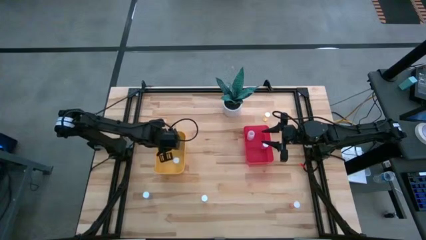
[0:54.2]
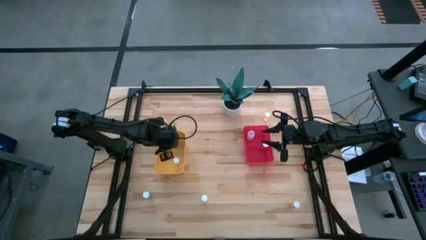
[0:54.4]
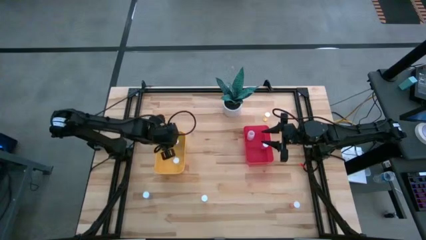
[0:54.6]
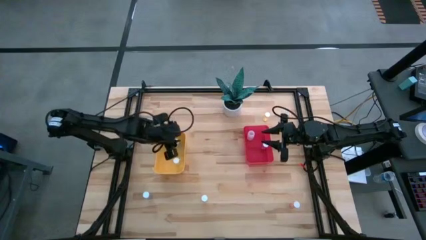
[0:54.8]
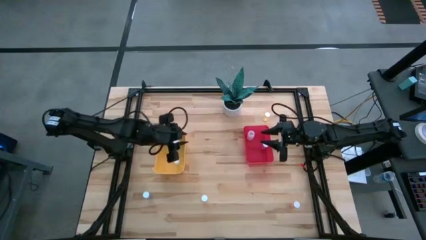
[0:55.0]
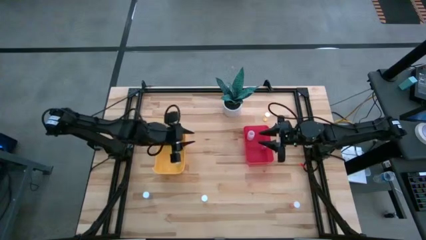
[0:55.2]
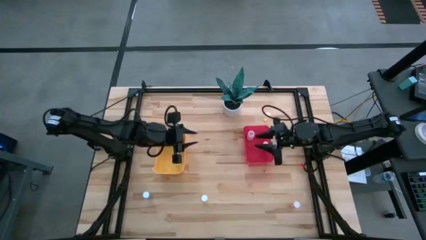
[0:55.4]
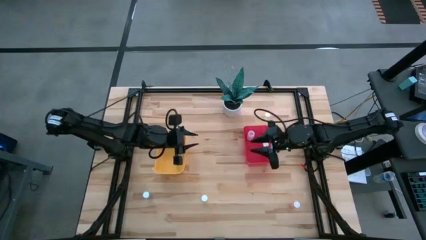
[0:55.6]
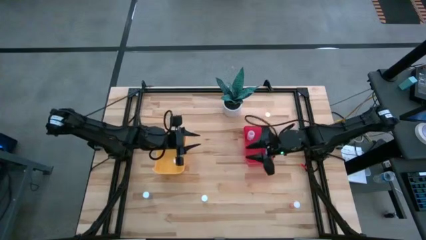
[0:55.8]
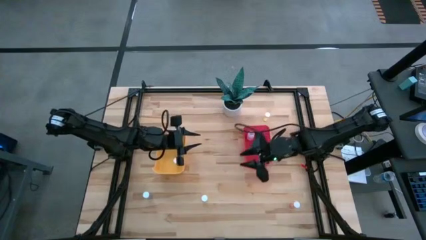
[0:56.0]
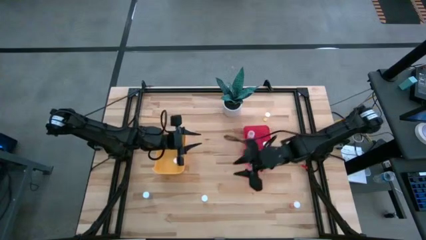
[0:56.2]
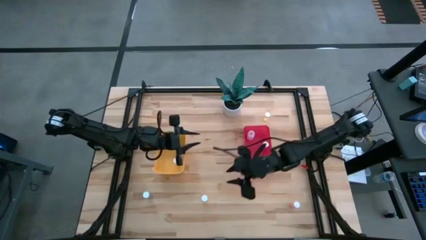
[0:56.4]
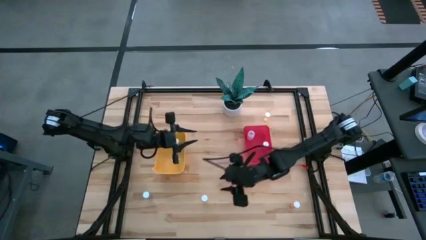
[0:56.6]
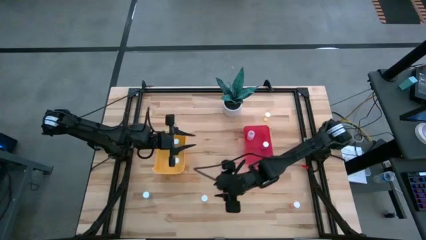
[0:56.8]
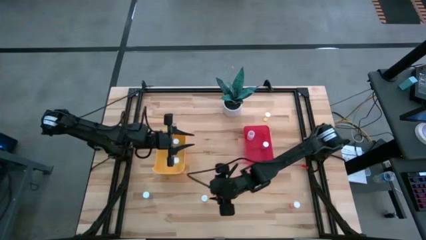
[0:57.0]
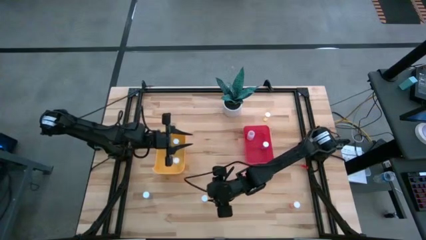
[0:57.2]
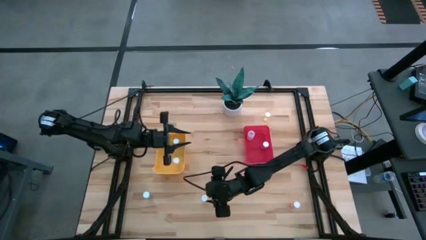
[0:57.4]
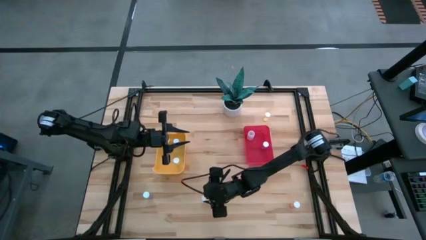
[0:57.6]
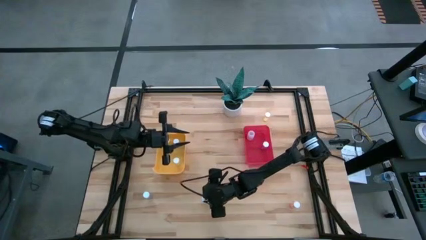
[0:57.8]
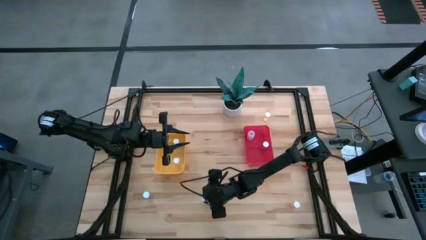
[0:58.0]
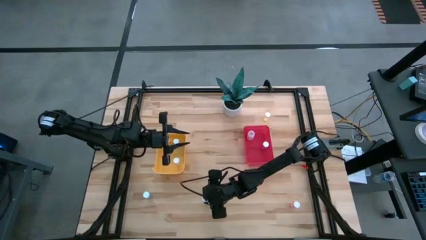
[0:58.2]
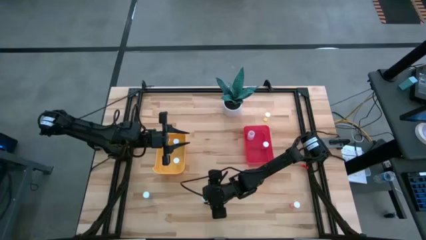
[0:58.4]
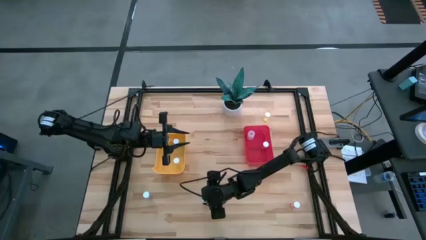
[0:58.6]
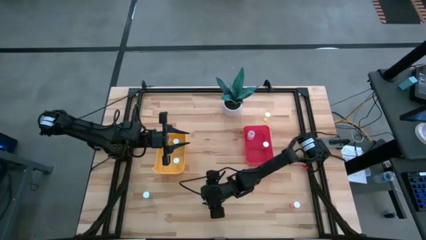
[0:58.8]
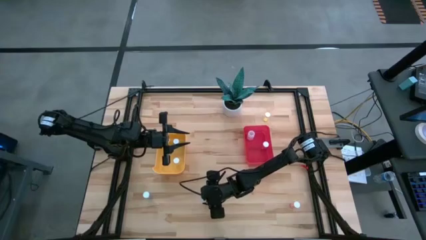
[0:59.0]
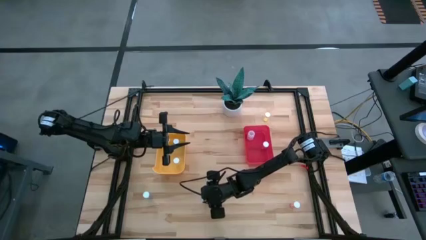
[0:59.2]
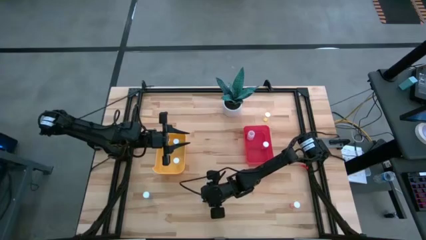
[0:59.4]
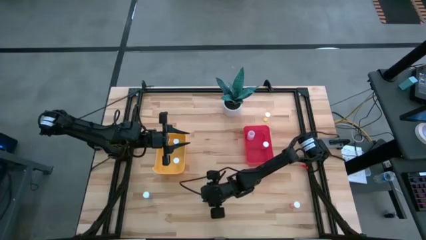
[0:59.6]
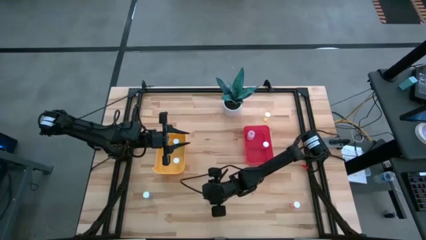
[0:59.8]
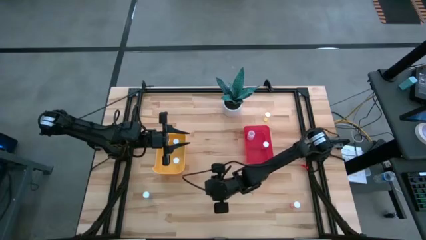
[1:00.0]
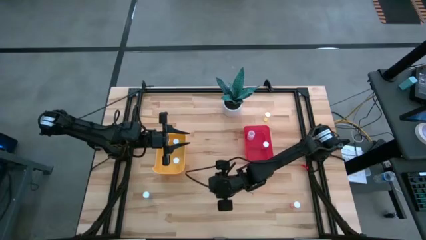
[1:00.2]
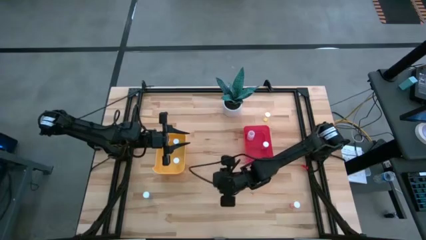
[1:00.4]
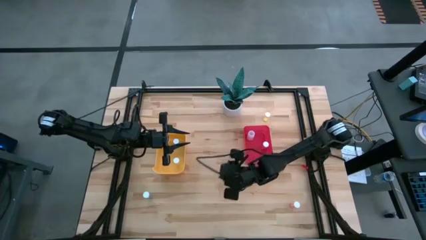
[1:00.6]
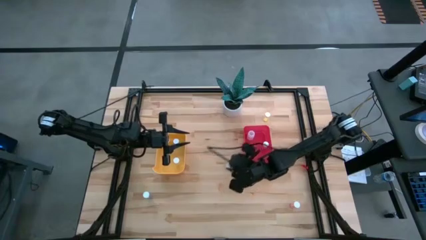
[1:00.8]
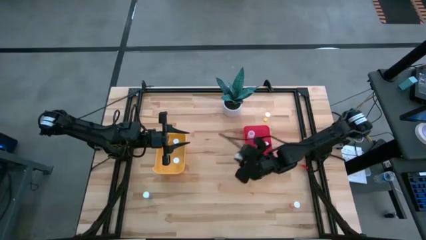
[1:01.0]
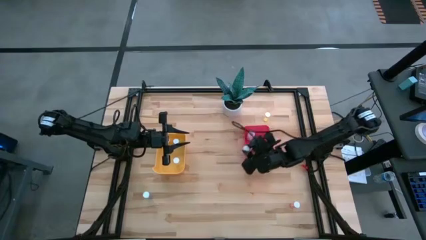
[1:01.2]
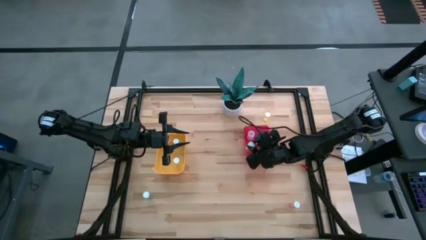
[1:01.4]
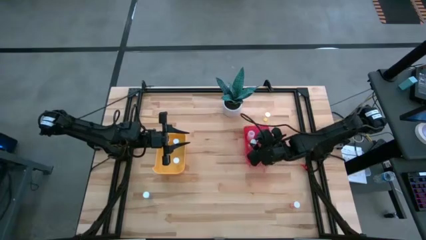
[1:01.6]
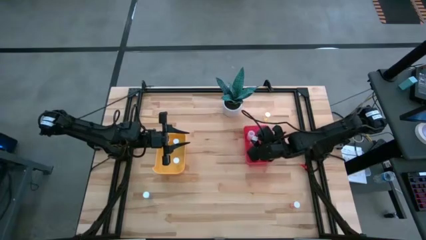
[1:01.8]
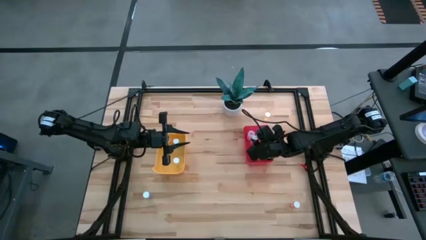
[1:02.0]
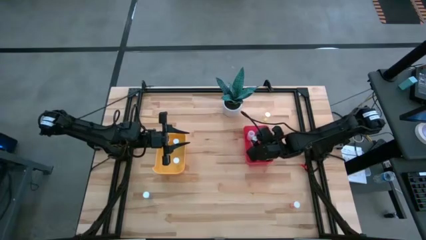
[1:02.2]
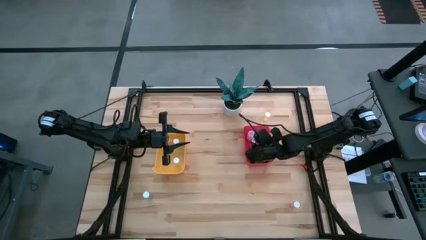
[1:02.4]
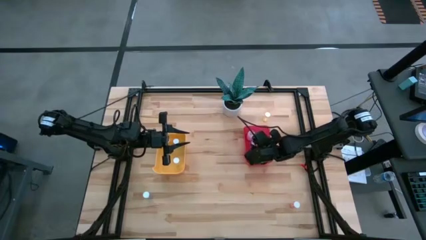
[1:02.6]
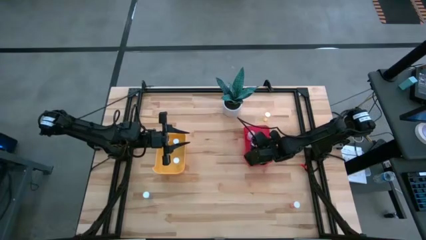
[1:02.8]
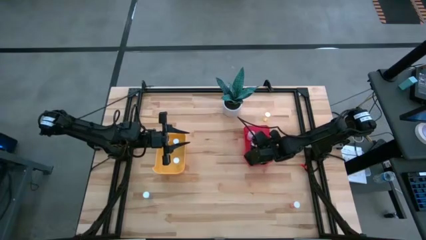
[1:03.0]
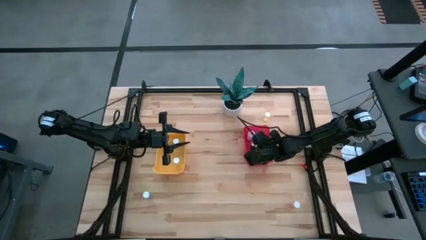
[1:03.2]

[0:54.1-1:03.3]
Task: Pick and place medicine bottles into bin by pill shape (circle, oval)
Put the bottom yellow capsule bottle into the red bin

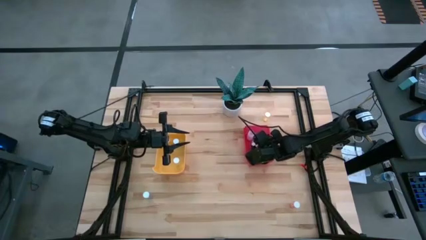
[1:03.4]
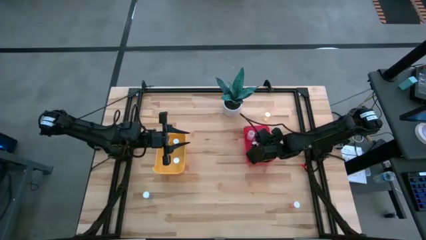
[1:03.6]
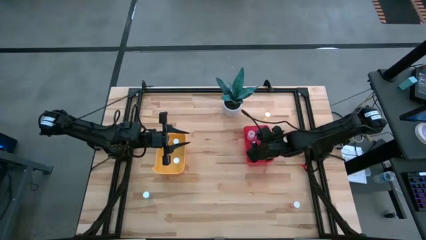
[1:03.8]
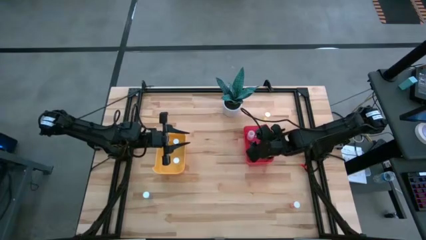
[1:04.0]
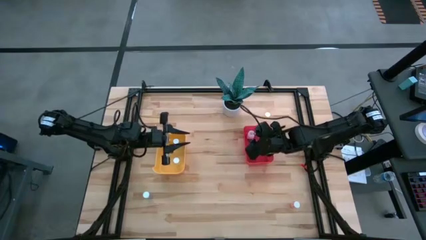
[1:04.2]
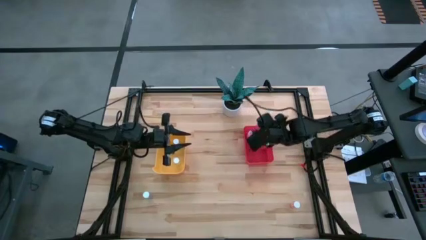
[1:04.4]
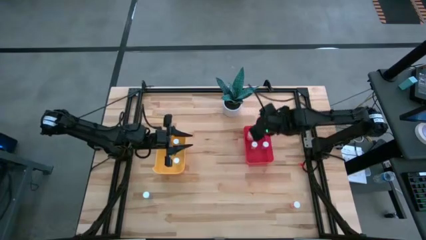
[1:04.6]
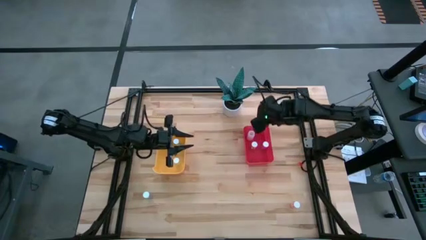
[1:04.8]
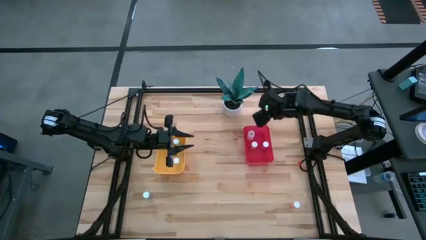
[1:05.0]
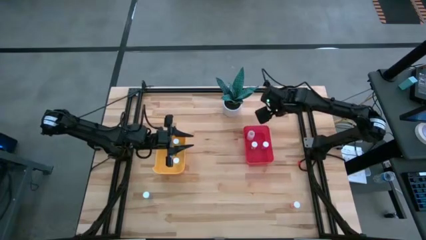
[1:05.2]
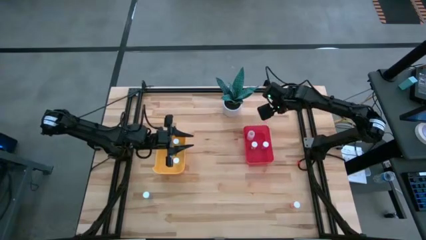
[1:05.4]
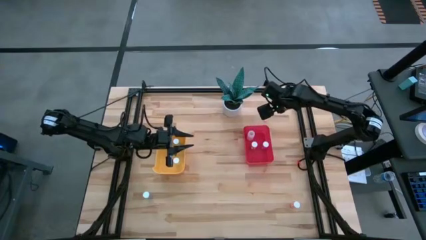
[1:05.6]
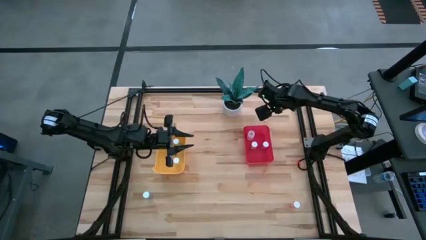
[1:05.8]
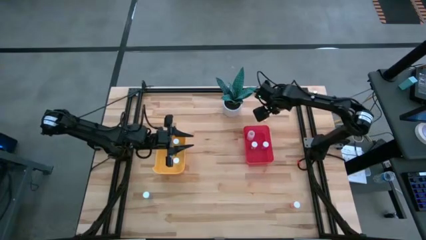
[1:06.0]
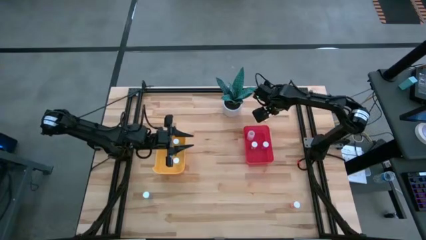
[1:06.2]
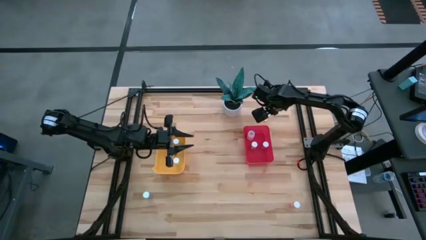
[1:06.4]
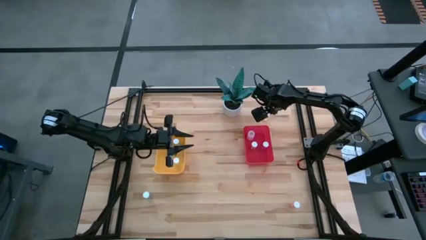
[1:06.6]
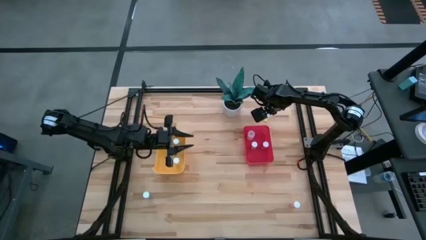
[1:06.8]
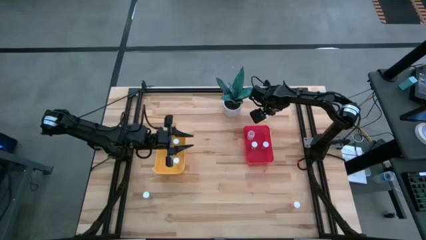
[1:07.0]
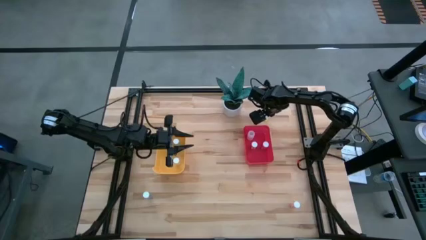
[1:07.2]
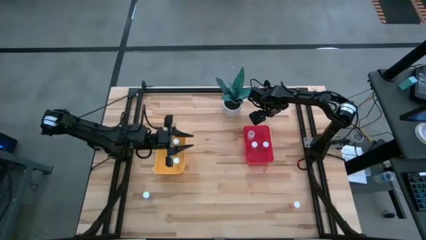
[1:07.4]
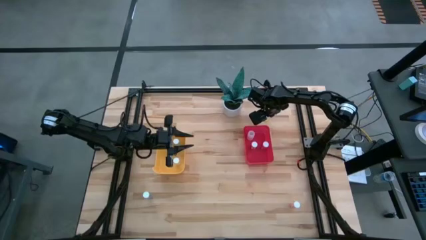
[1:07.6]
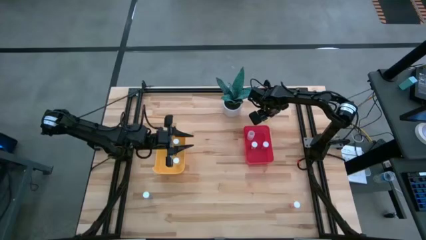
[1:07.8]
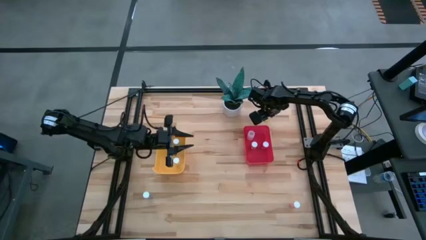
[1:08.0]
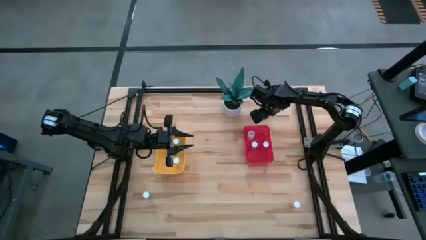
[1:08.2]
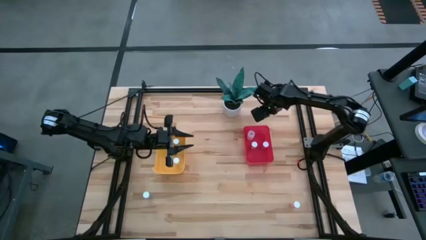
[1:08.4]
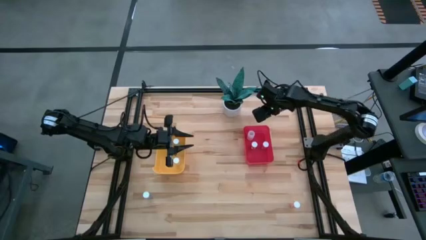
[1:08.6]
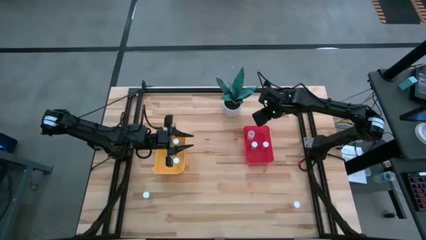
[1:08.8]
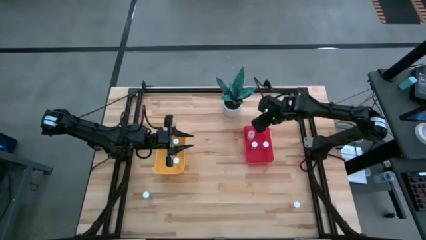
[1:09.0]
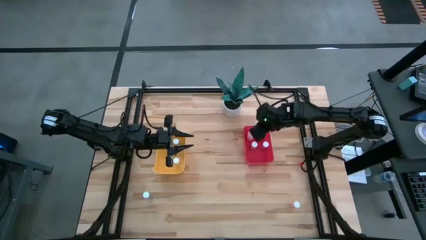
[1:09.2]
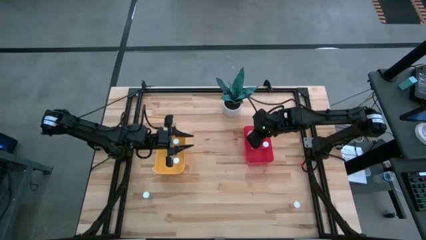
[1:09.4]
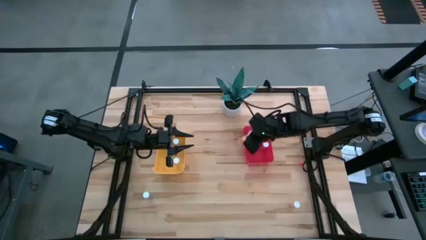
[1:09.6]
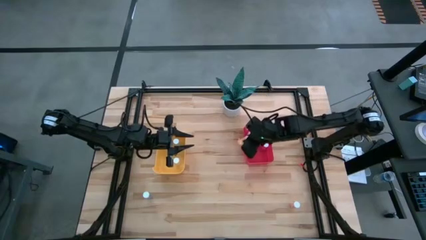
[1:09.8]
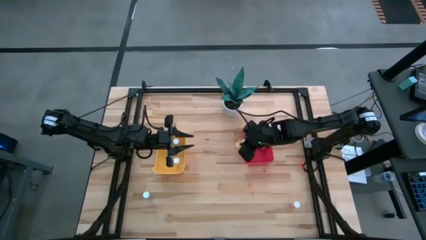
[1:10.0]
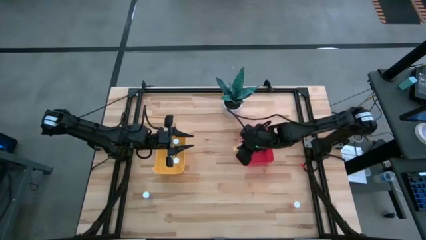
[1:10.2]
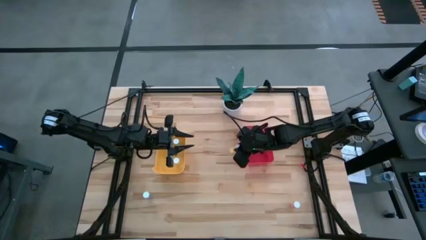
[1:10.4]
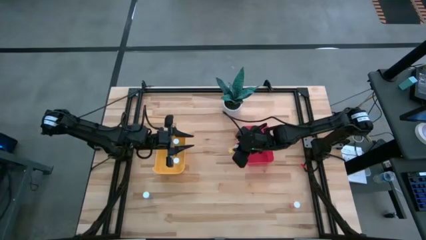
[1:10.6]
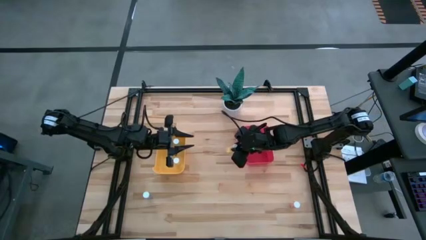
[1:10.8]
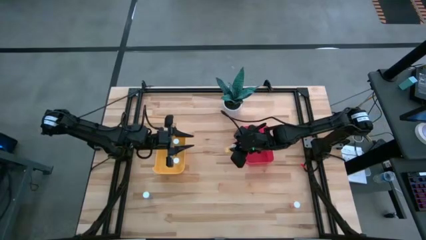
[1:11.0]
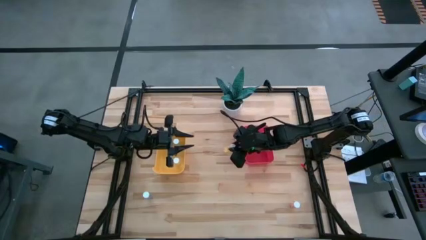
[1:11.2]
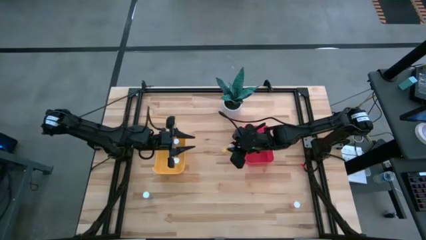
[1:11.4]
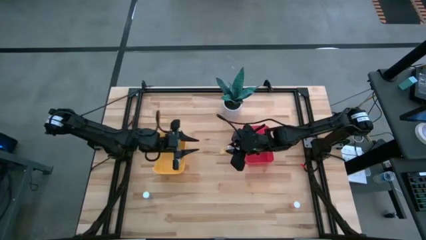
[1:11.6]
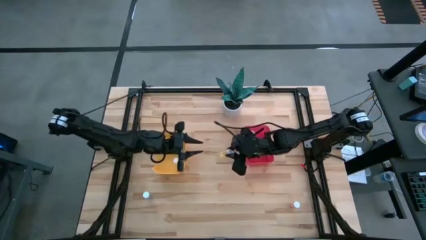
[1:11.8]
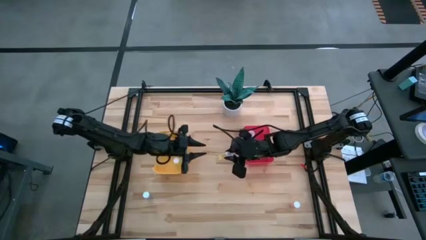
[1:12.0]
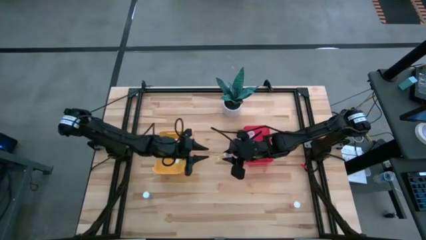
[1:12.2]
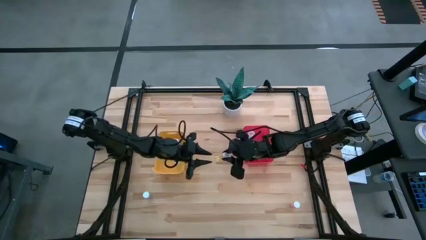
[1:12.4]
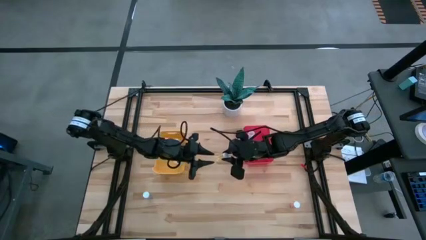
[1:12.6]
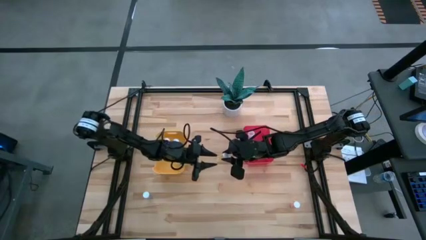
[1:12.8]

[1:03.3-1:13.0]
Put the yellow tablet bottle into the yellow bin
